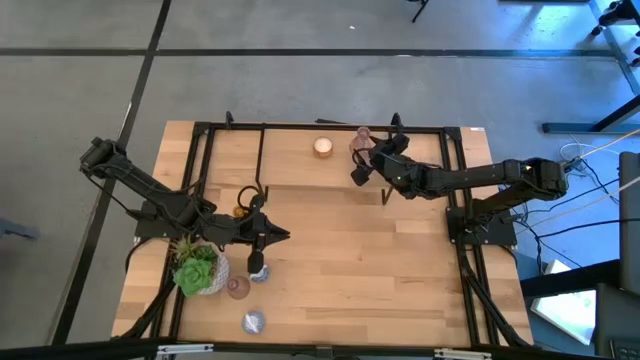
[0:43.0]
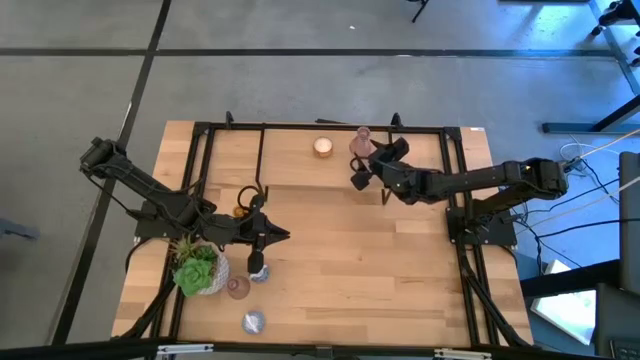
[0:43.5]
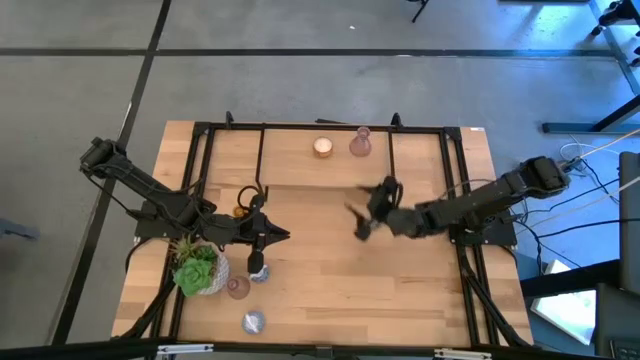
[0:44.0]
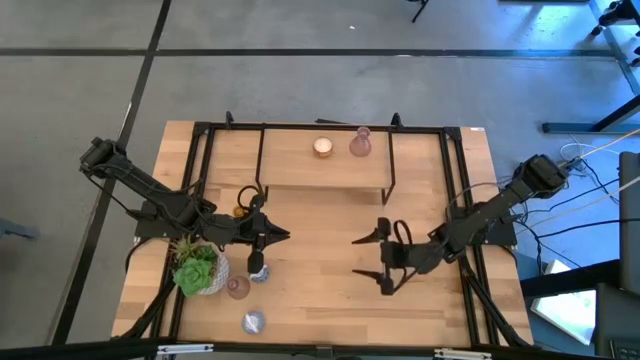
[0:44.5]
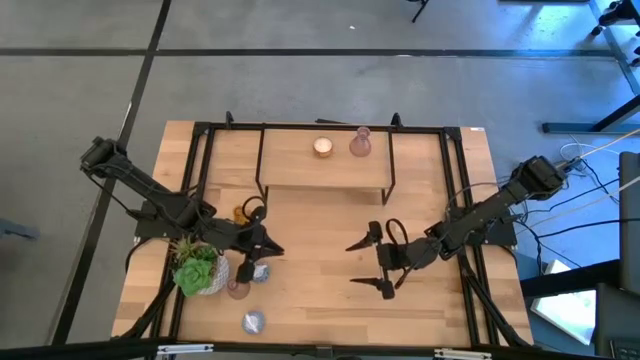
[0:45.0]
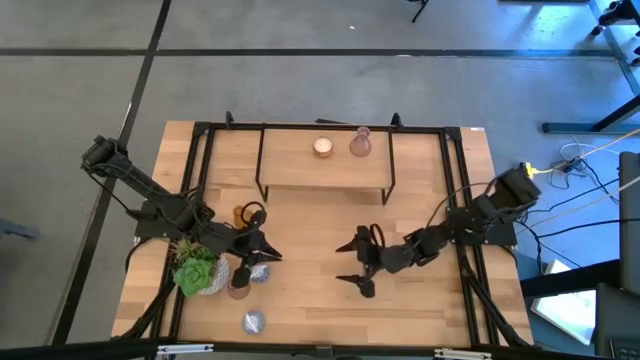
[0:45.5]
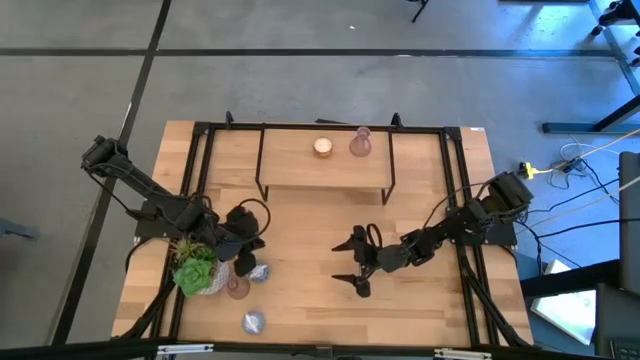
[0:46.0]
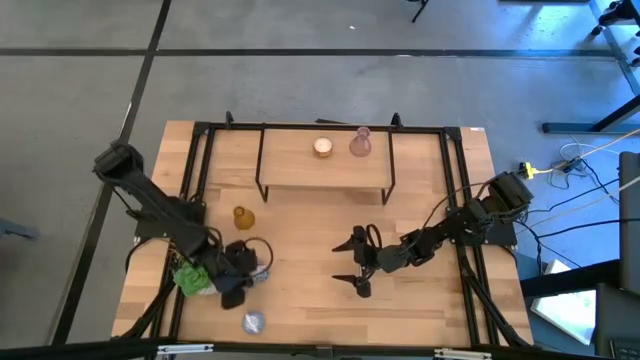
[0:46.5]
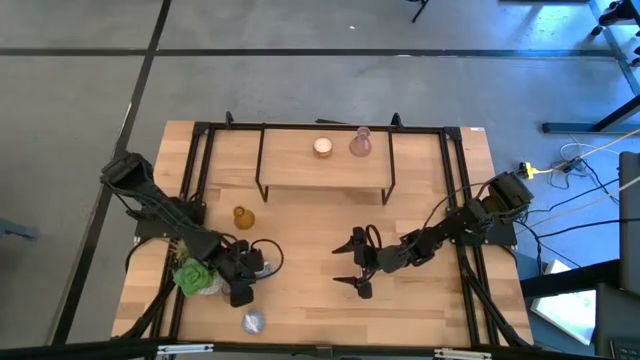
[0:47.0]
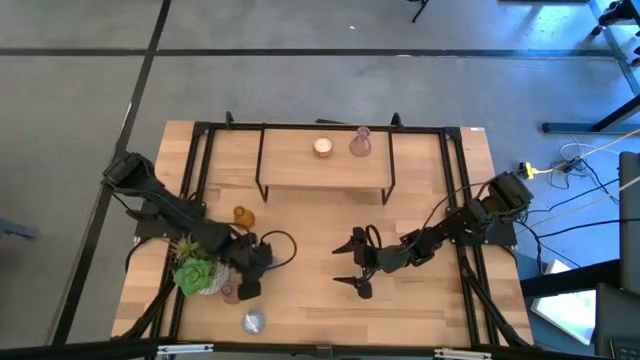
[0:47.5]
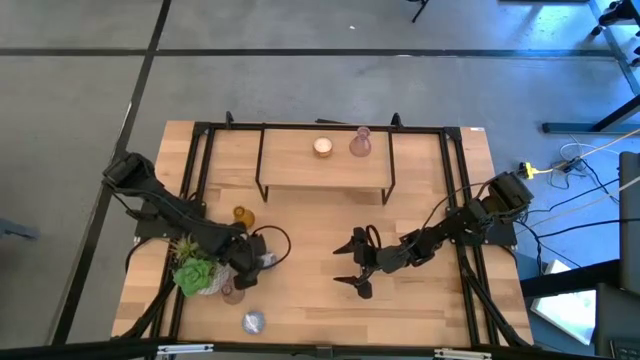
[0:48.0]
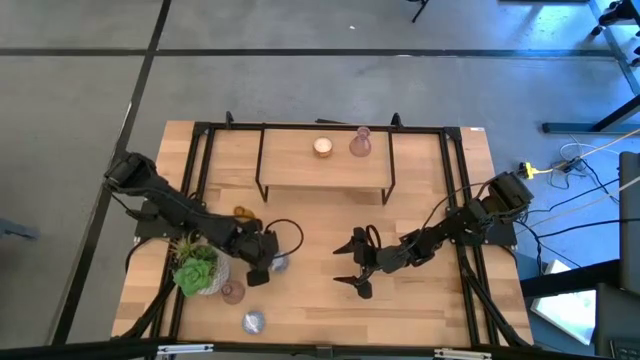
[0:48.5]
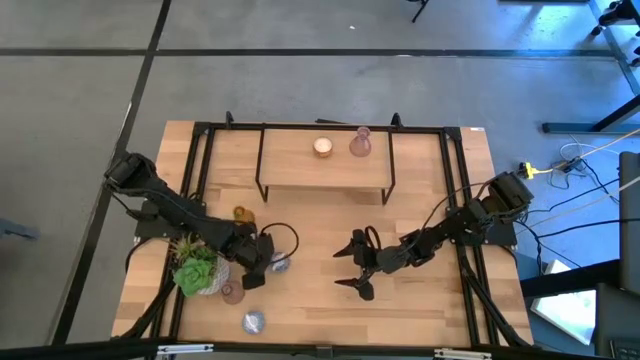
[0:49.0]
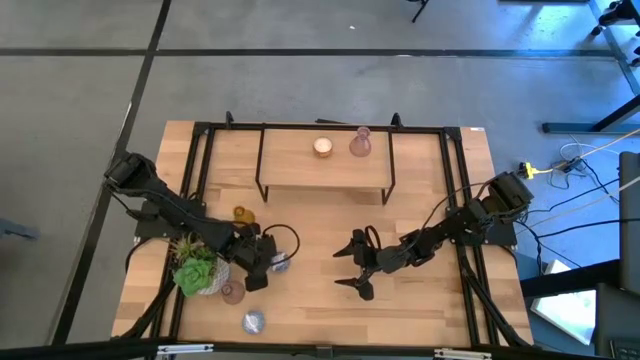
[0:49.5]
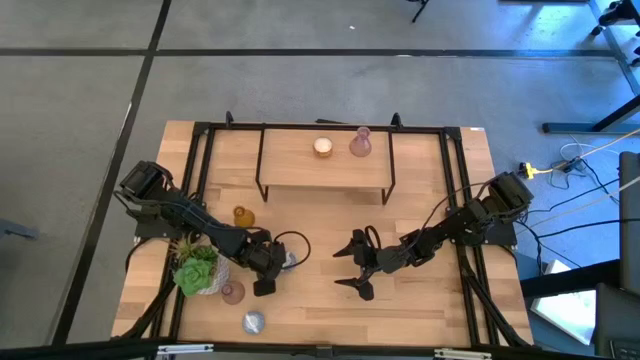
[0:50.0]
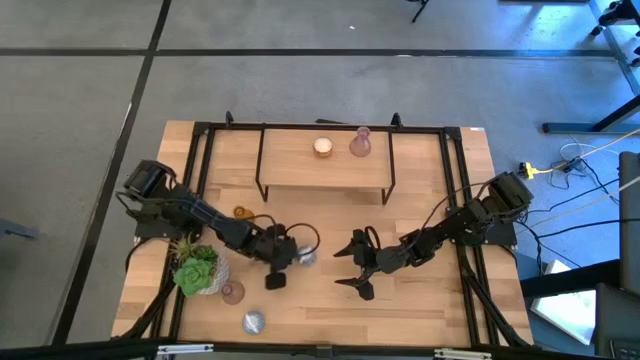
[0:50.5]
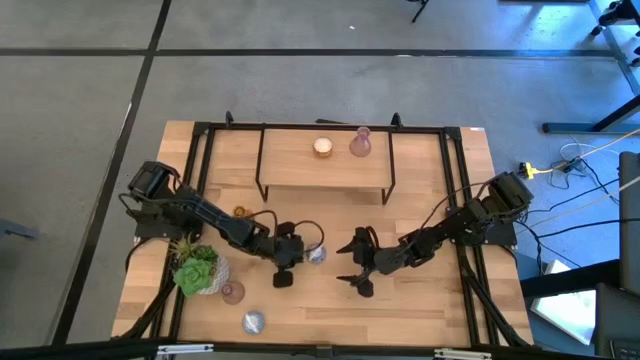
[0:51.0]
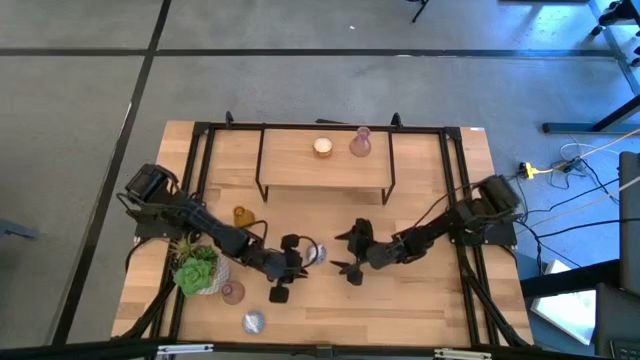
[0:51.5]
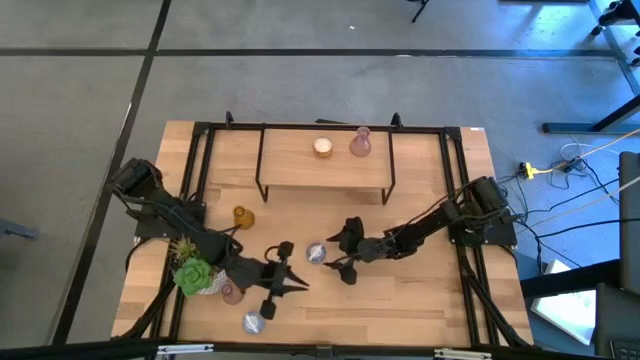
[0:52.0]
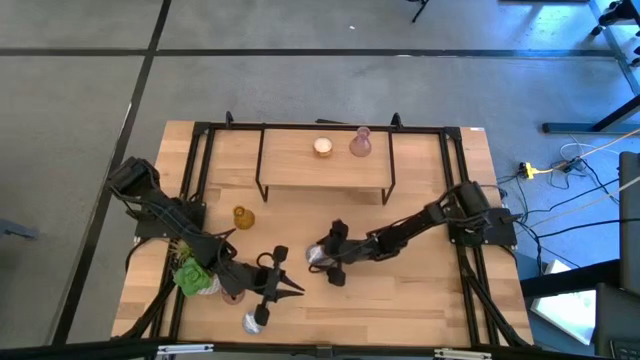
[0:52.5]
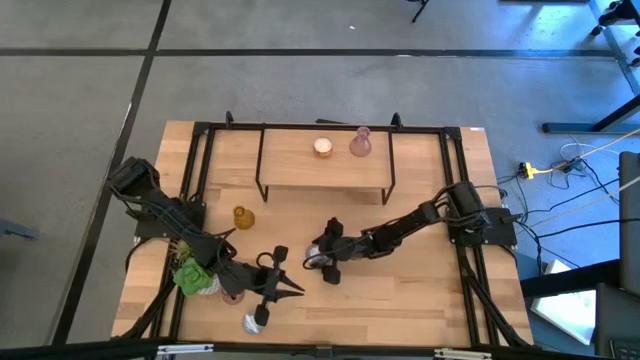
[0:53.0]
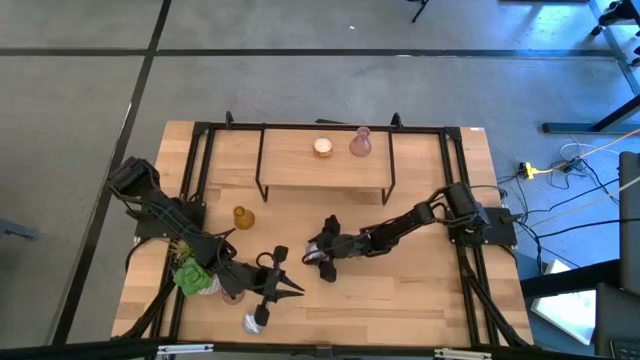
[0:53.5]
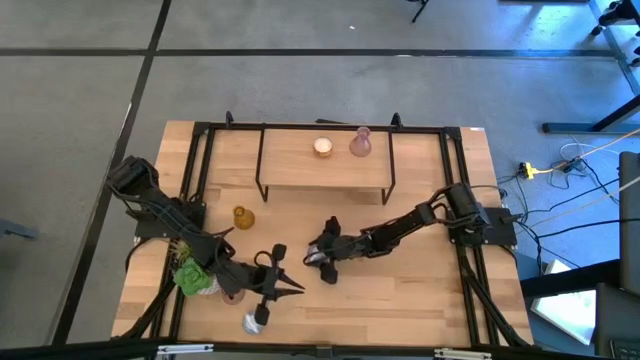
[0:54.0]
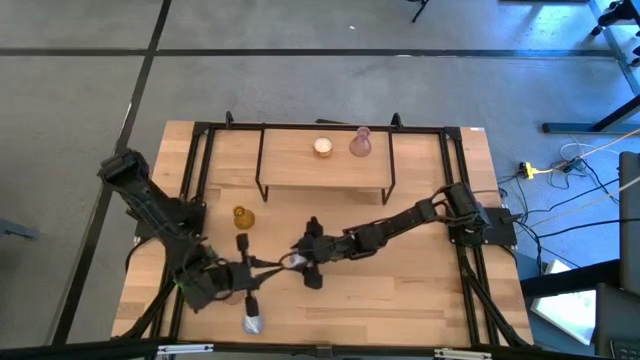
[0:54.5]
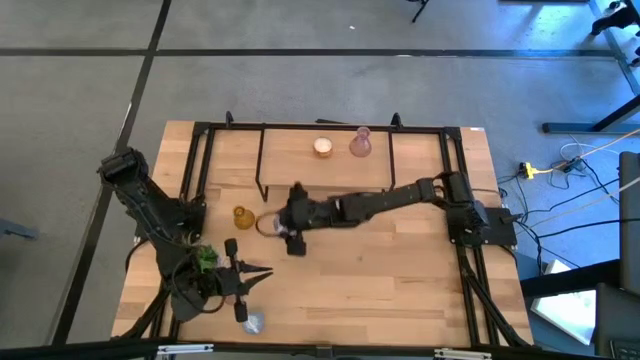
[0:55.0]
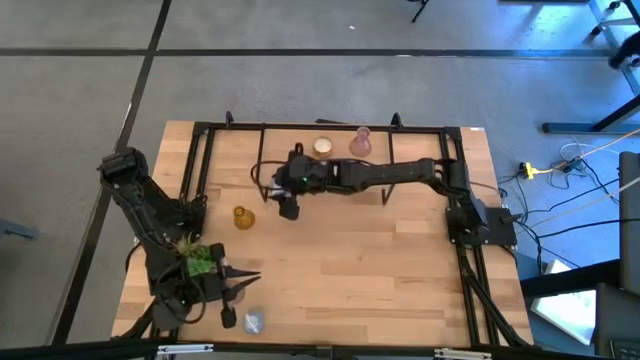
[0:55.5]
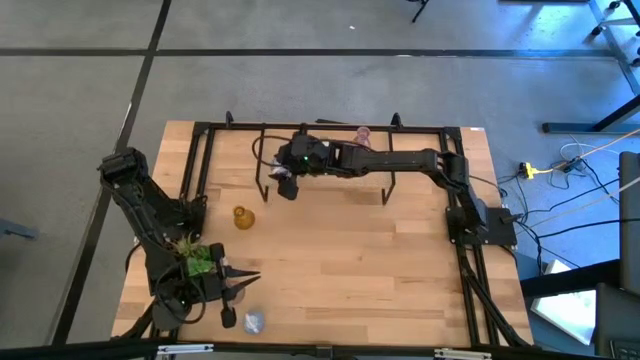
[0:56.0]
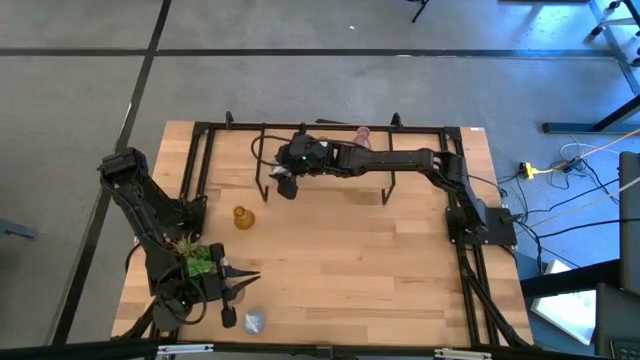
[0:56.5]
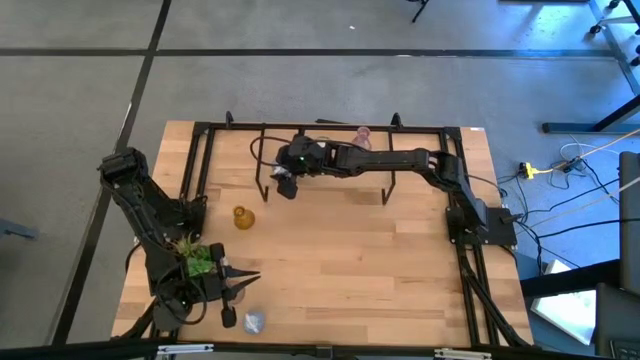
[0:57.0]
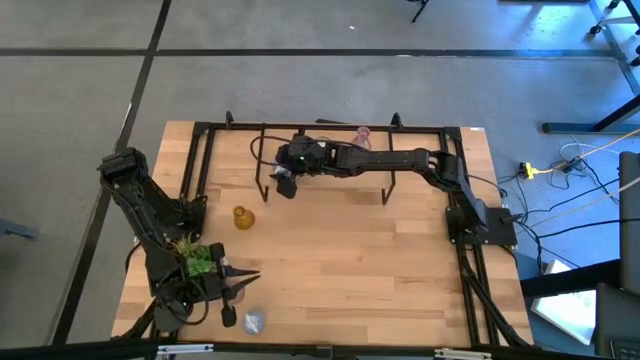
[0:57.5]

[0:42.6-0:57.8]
Task: Pick & Place candle stick holders
Put the top blue scented candle on the shelf

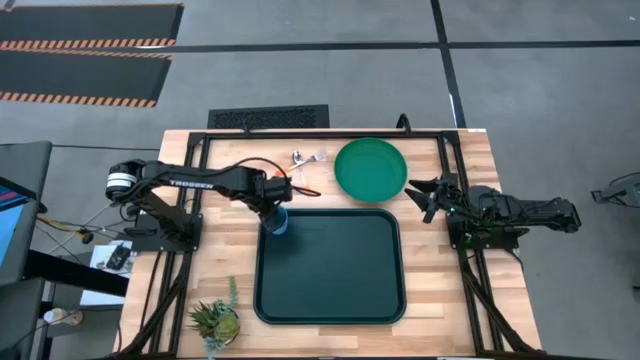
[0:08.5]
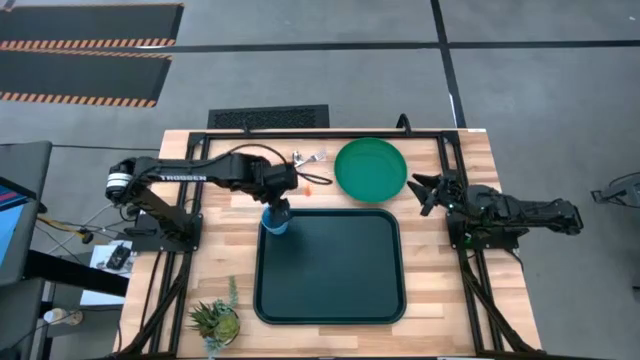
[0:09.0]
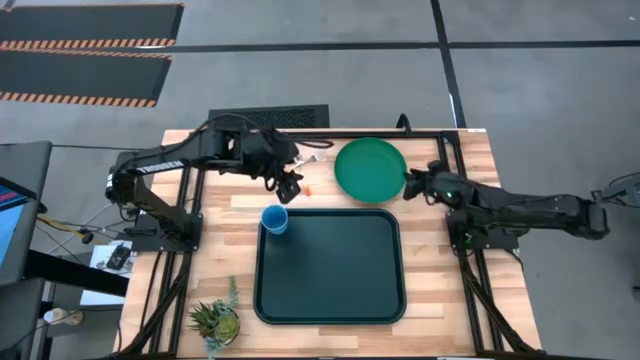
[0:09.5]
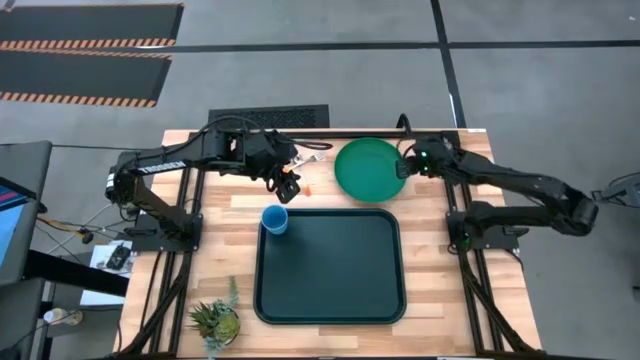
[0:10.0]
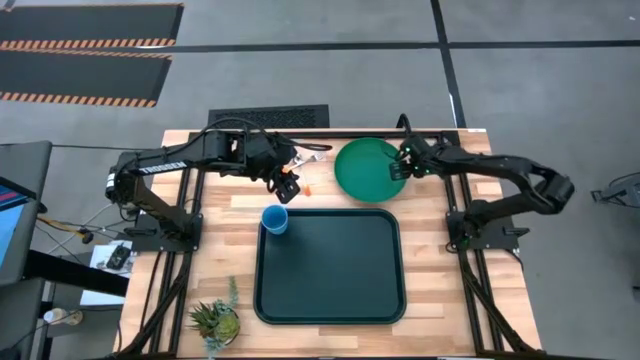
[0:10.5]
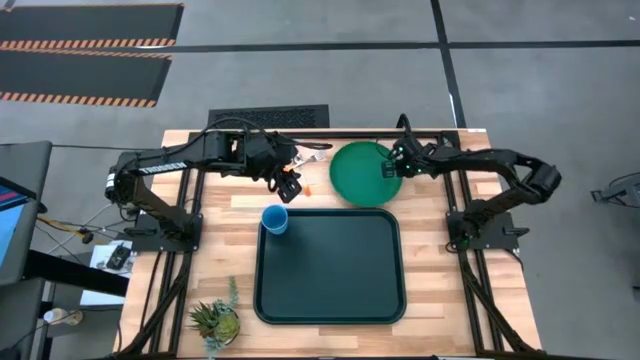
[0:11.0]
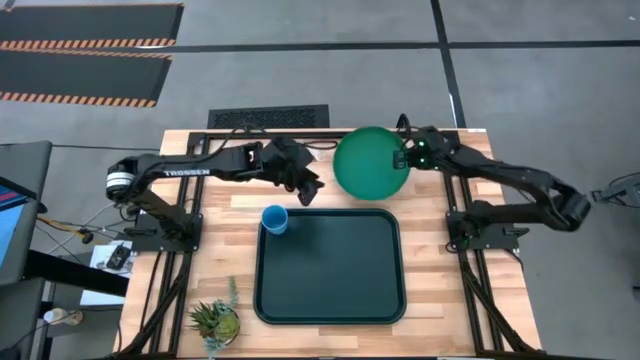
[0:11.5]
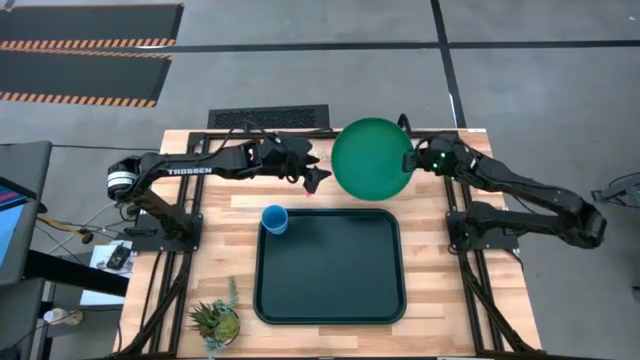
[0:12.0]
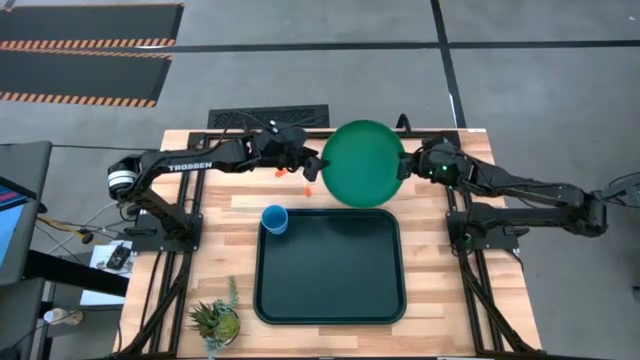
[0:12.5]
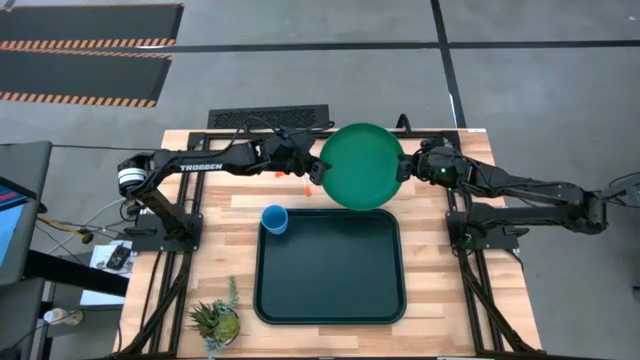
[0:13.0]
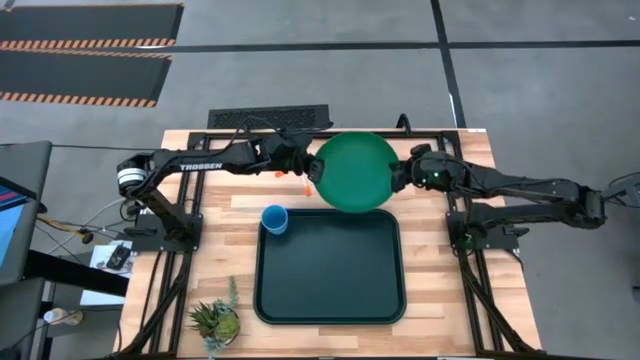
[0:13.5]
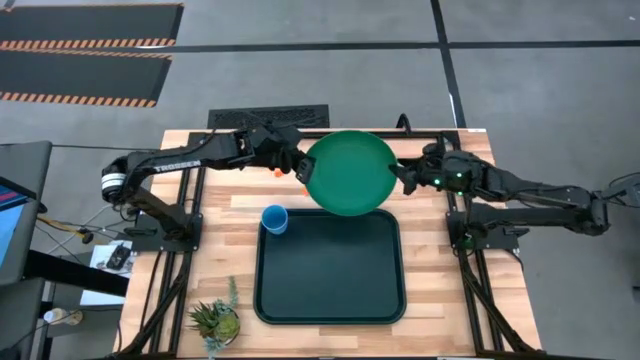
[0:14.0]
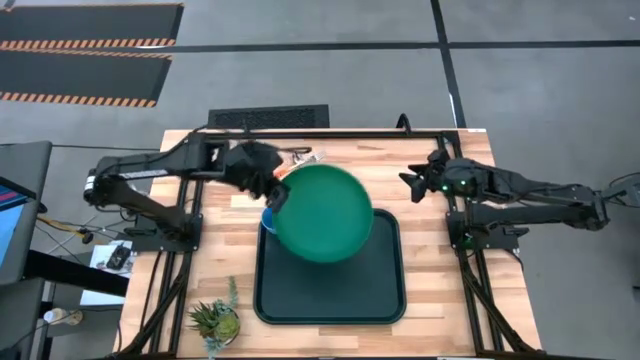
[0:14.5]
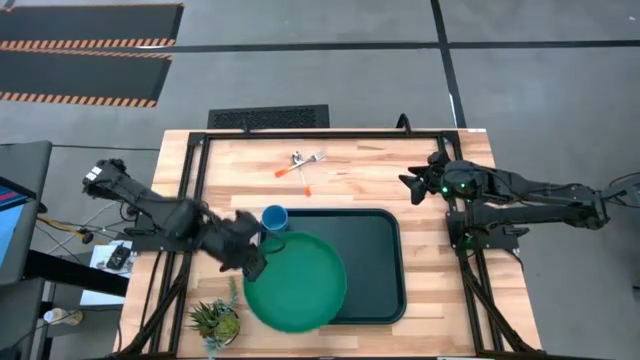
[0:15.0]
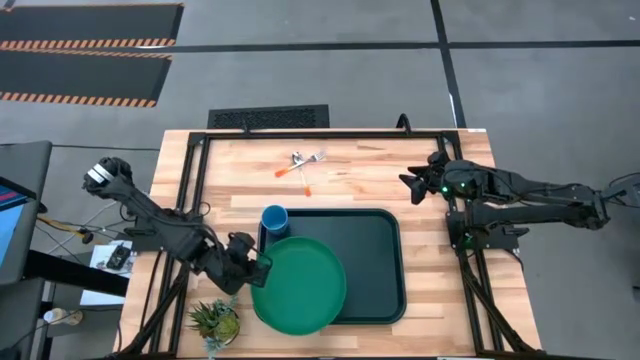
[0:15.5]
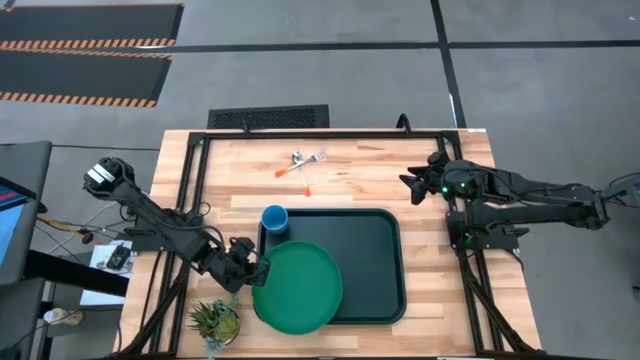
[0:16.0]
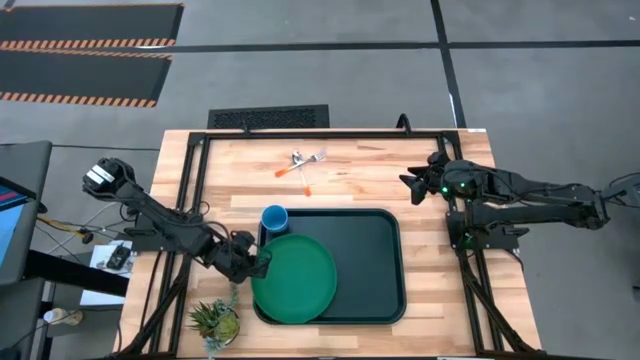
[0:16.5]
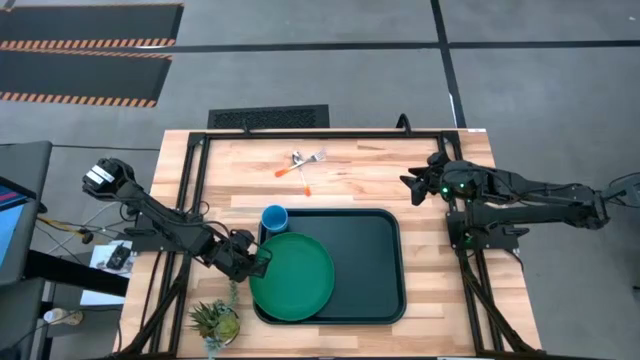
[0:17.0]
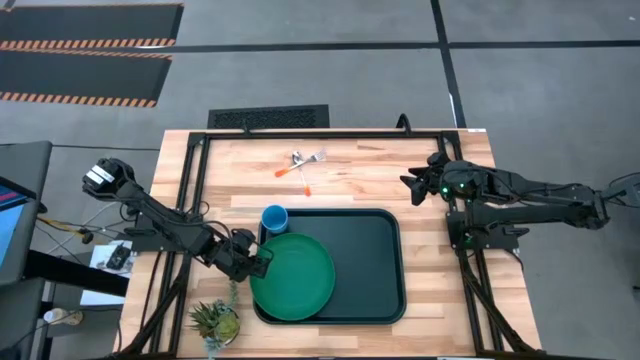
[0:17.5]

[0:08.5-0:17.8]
Task: Pick and place plate/cup/fork/spoon on tray
Put the green plate on the black tray to the bottom of the blue cup
